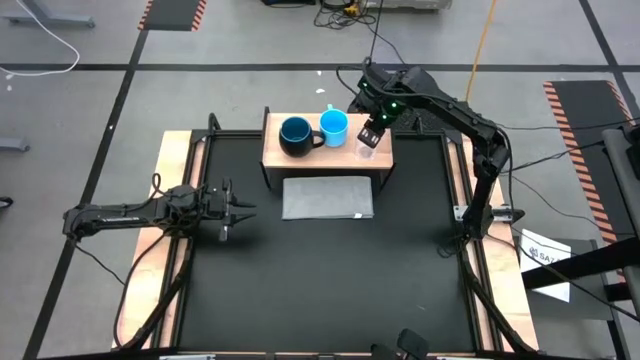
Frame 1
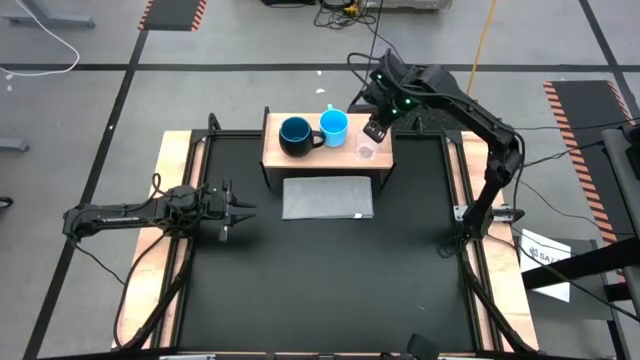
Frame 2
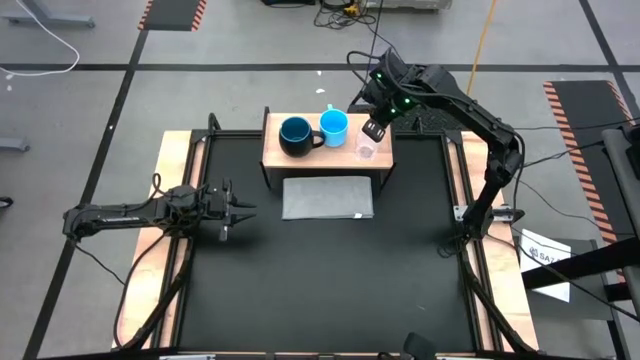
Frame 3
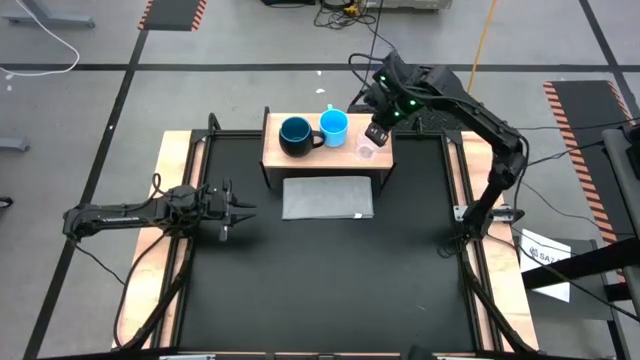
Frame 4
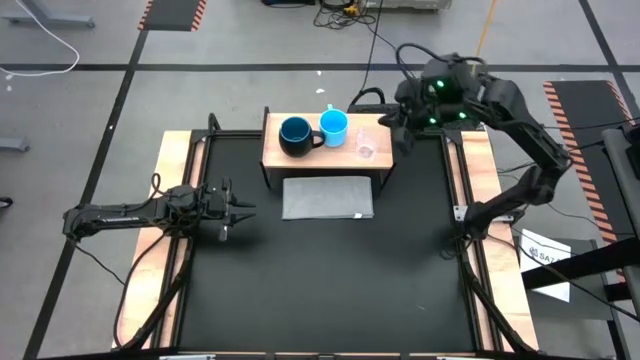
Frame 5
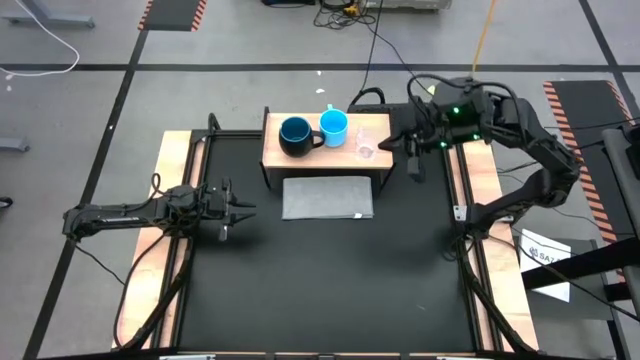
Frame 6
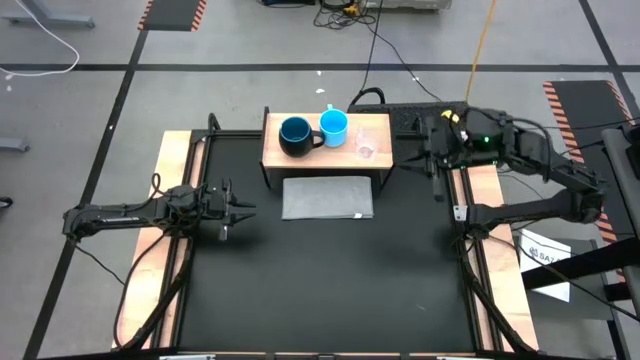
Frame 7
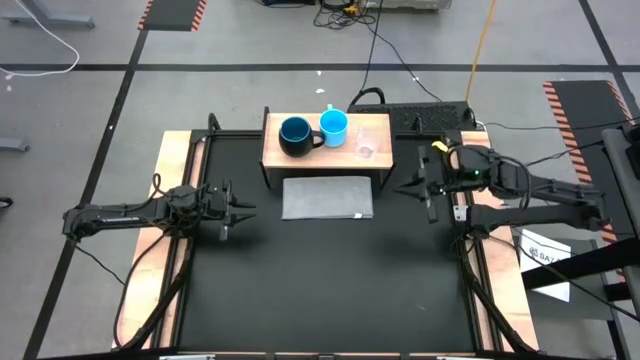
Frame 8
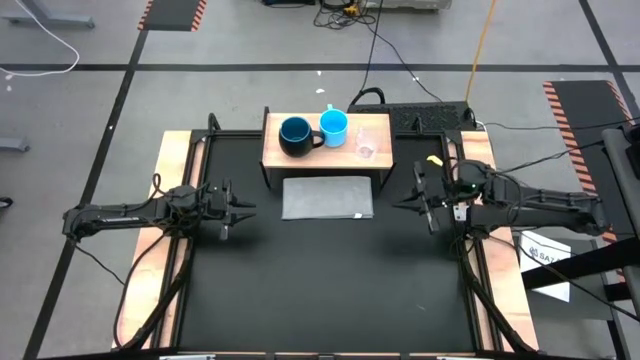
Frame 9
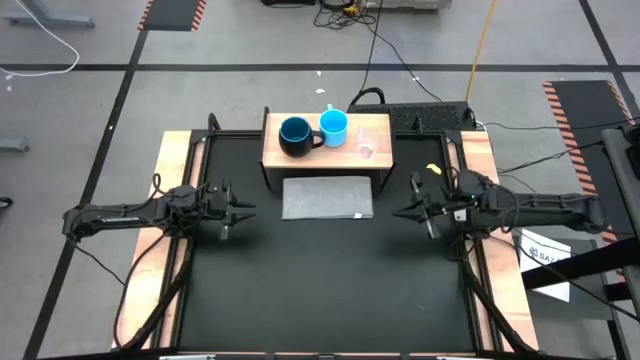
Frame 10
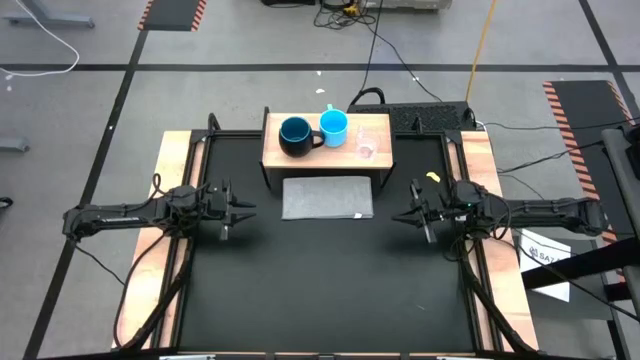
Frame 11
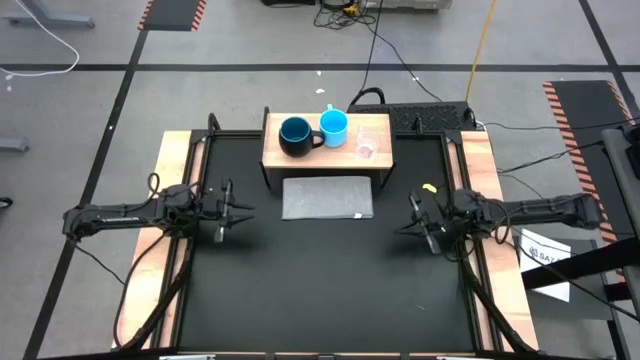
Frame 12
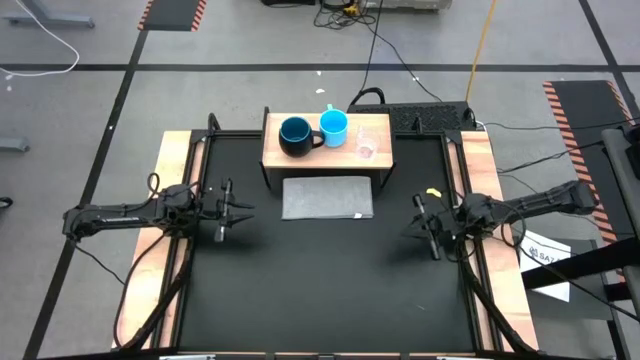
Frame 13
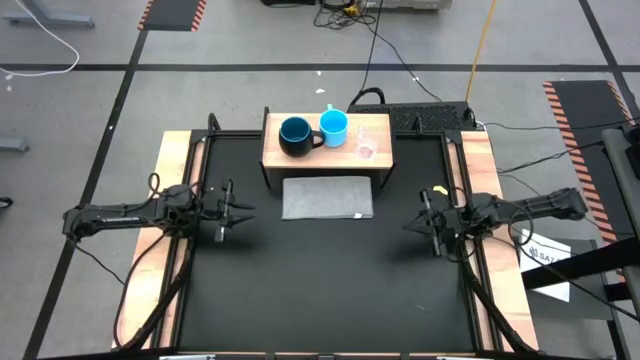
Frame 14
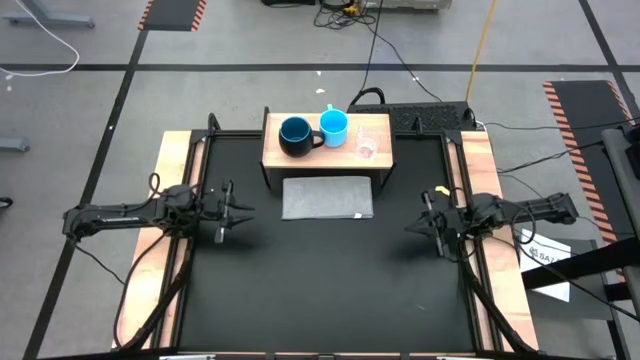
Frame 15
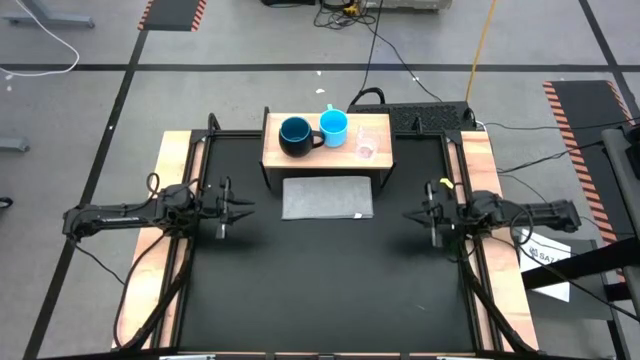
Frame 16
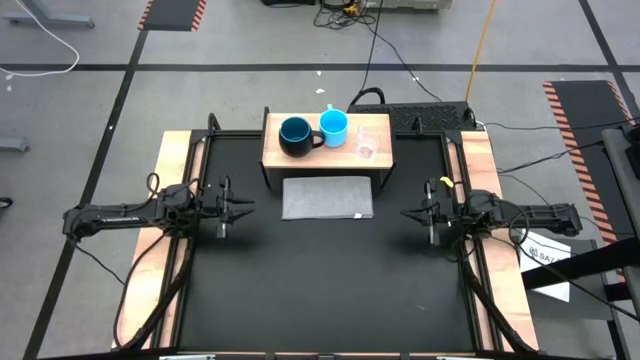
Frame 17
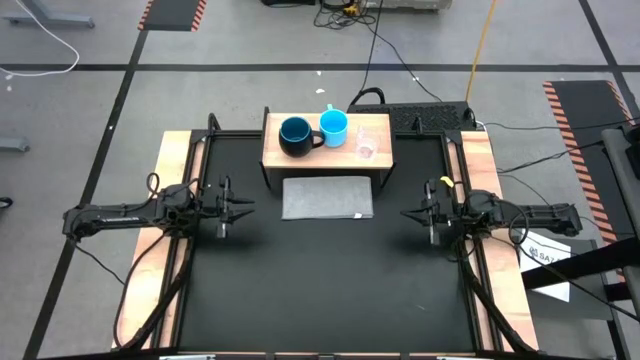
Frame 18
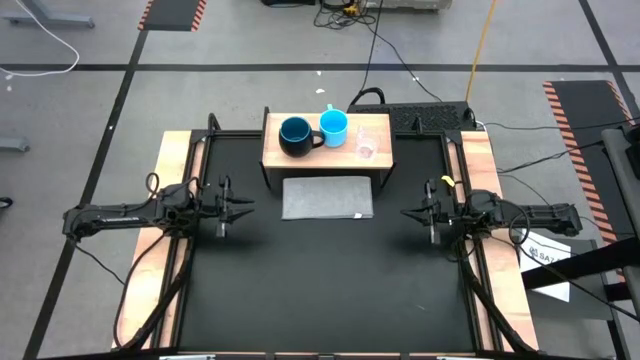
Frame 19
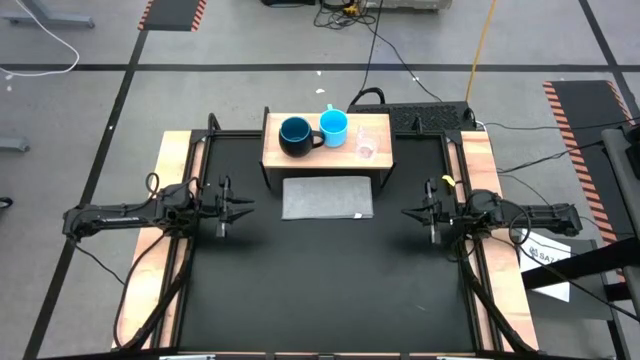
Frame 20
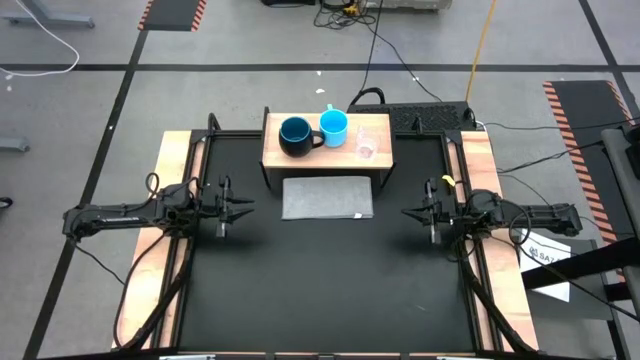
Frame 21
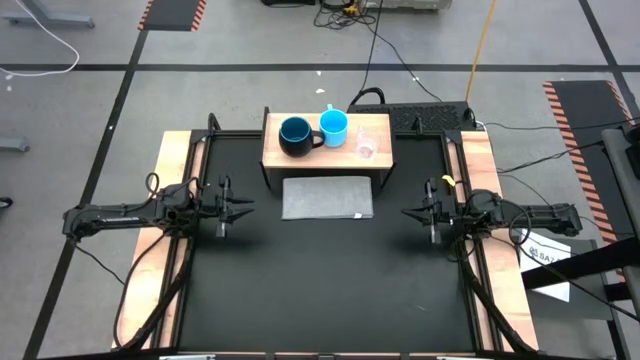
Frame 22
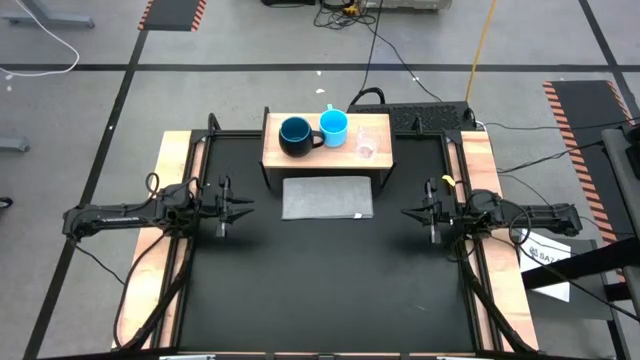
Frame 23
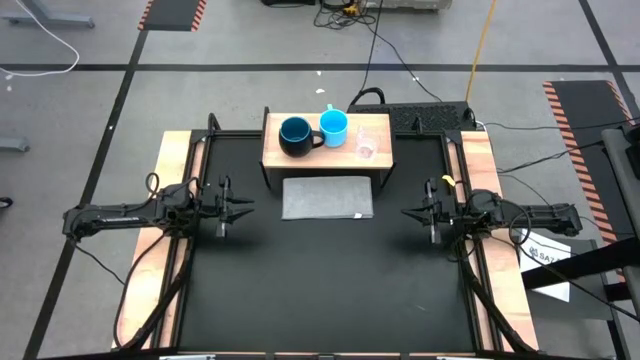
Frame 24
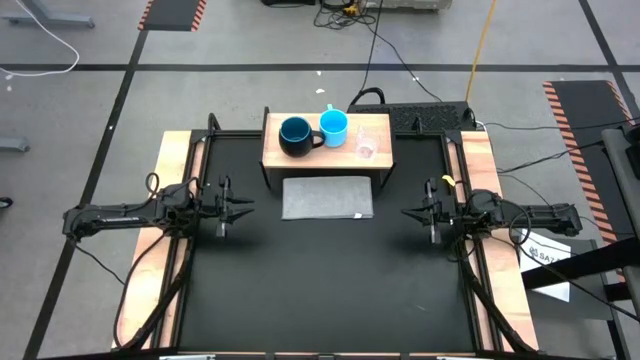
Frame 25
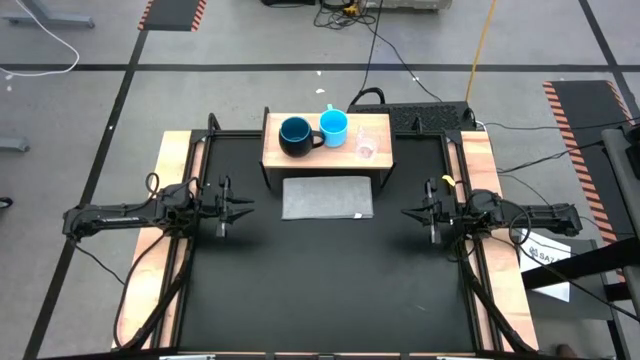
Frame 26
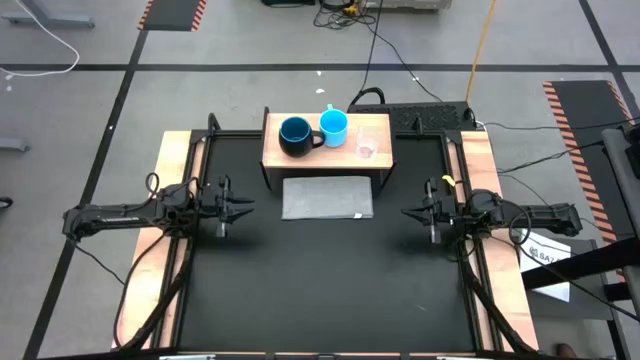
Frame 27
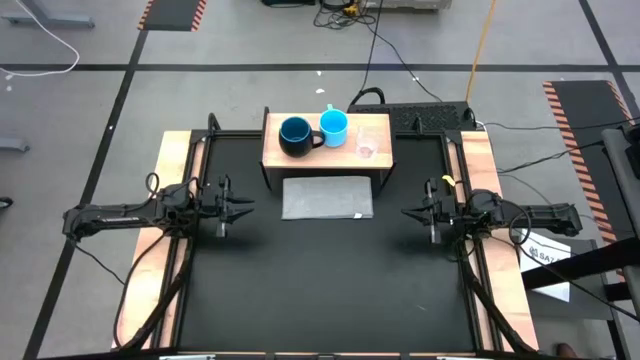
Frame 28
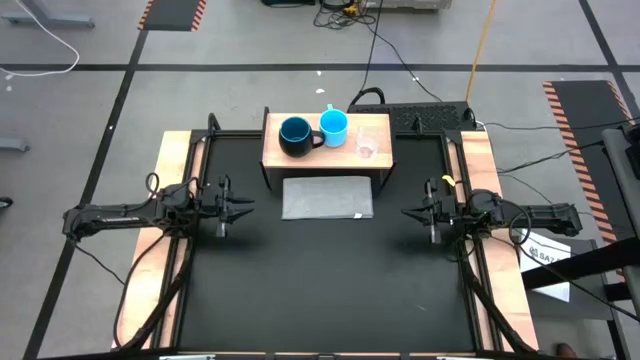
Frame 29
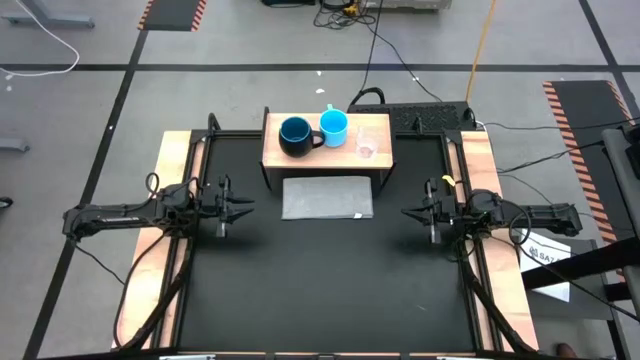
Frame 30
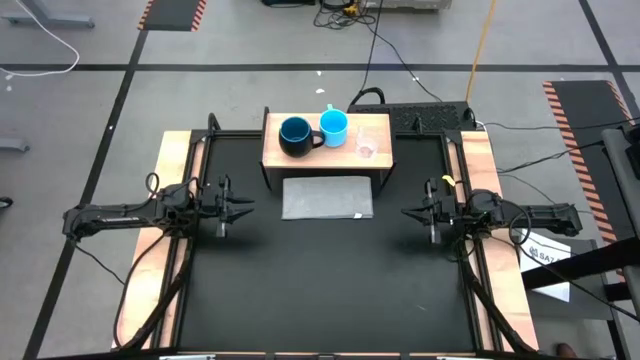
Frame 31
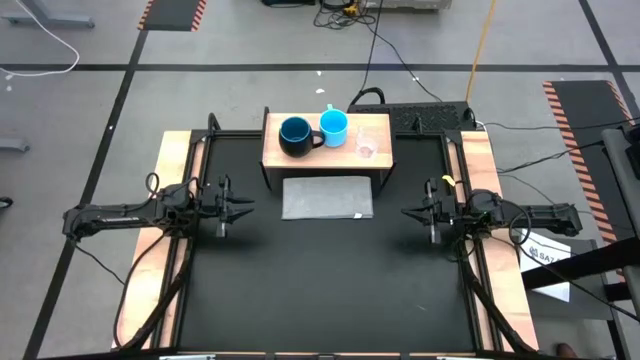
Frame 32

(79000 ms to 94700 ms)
Task: Stack small to large cups/mugs on shelf
Return to Home Position

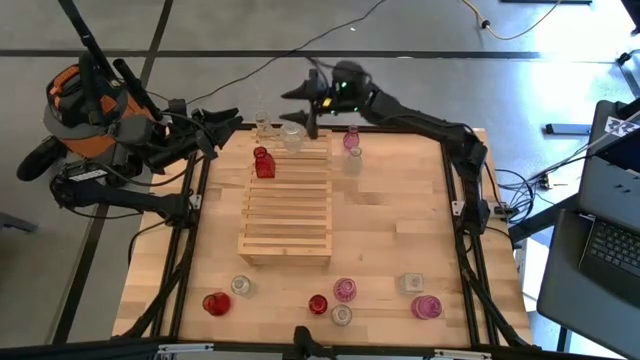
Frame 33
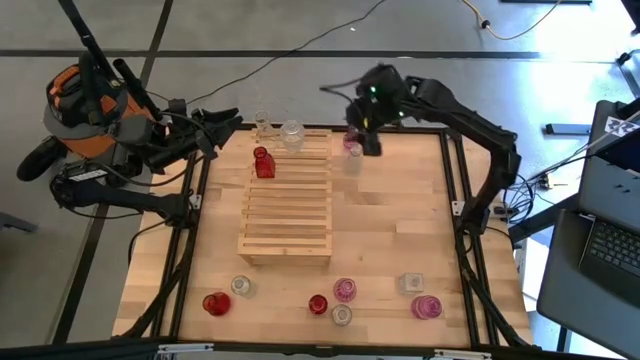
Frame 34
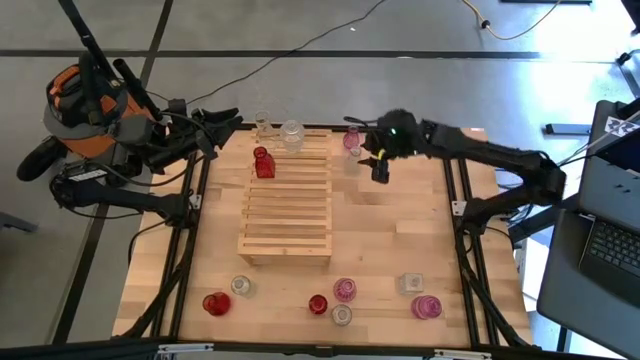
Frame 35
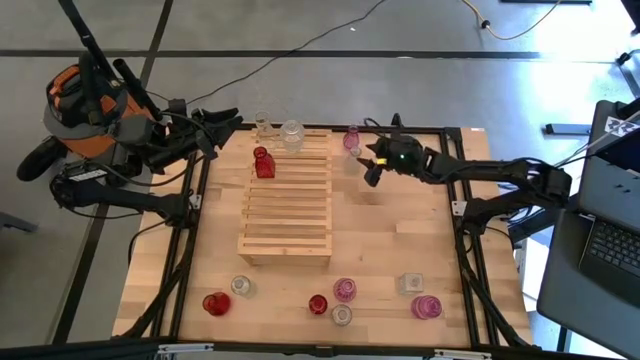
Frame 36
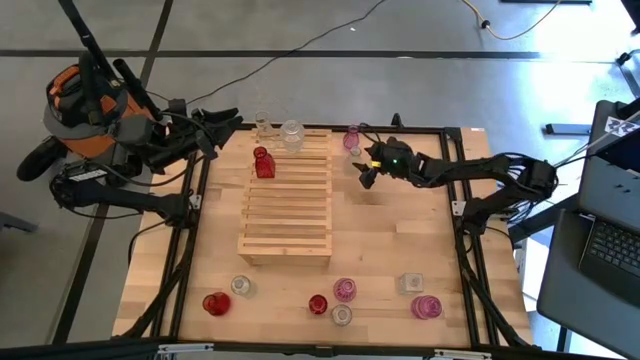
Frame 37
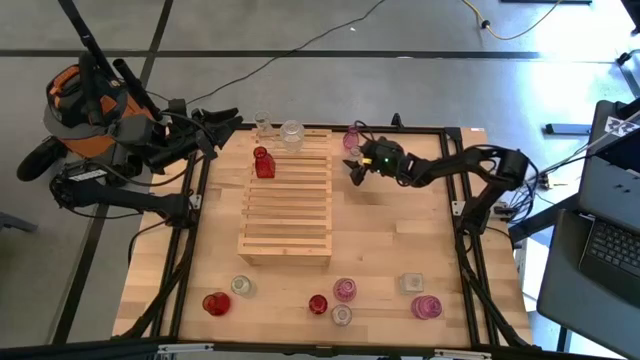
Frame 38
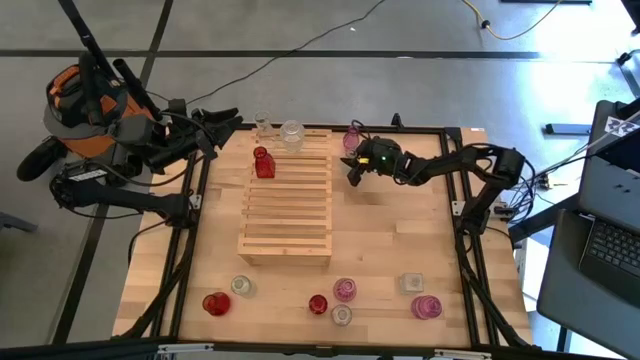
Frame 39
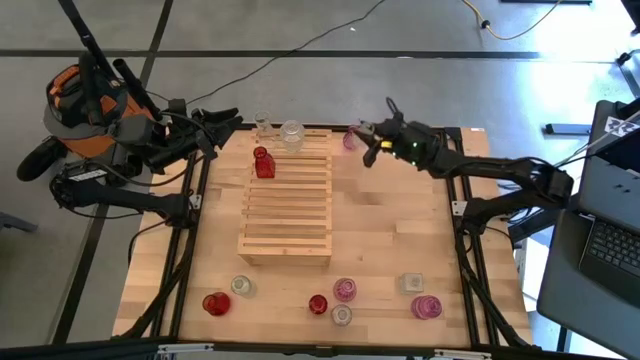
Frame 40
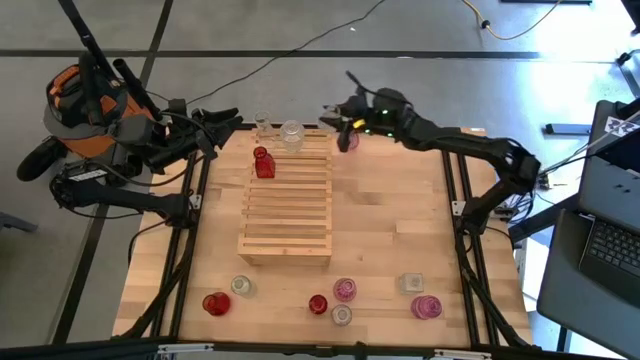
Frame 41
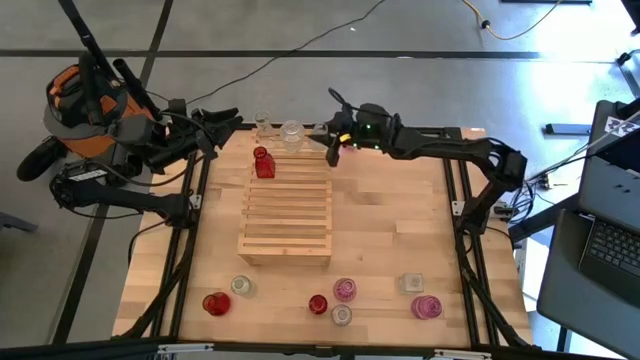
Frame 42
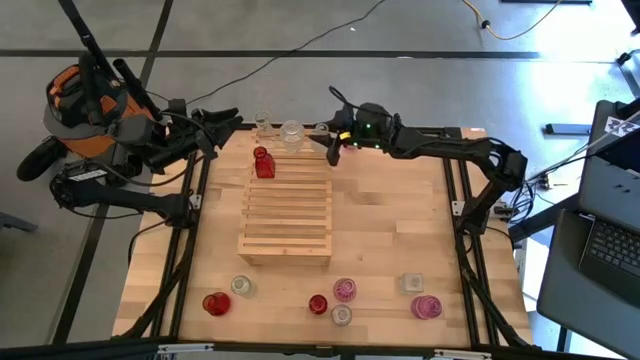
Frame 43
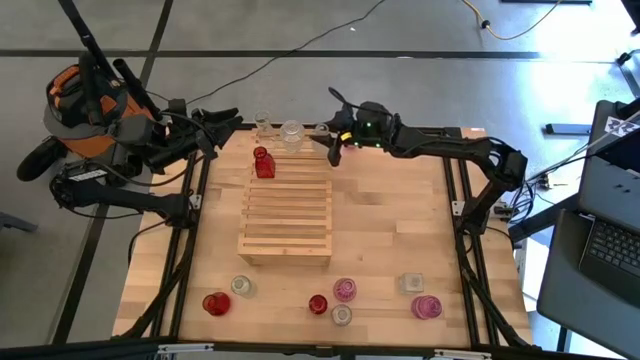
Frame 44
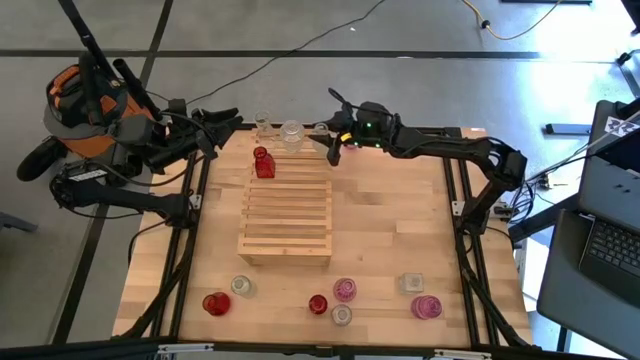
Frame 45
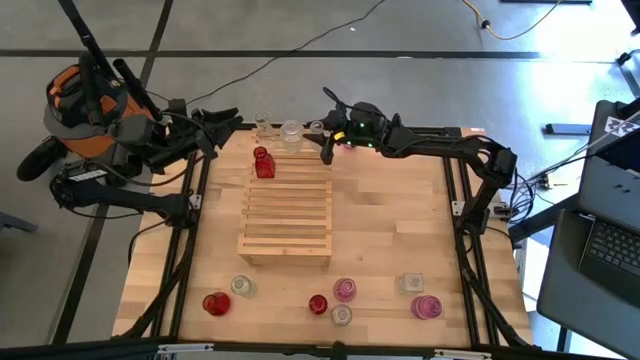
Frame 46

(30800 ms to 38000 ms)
Task: sort vases onto shelf
Put the transparent vase on the shelf aligned with the other transparent vase
